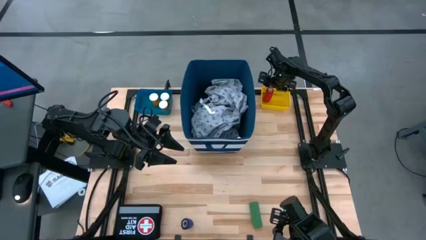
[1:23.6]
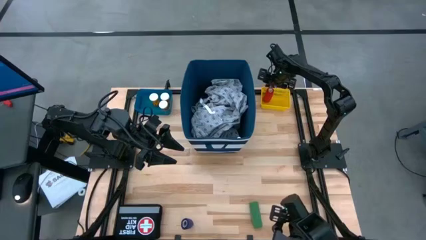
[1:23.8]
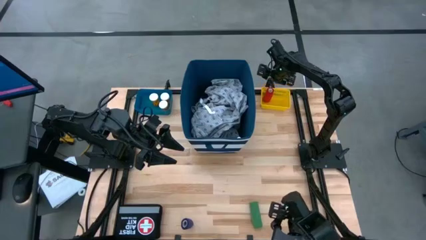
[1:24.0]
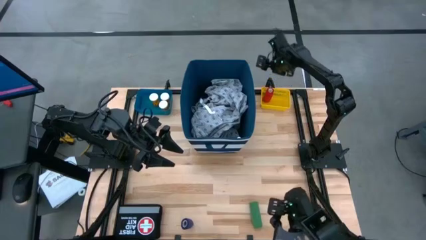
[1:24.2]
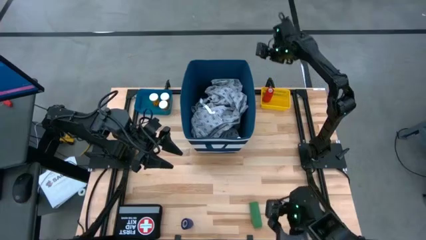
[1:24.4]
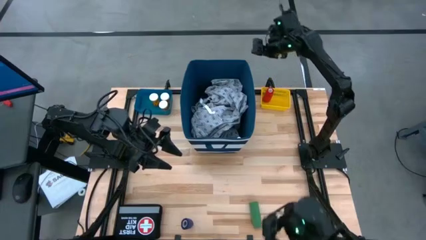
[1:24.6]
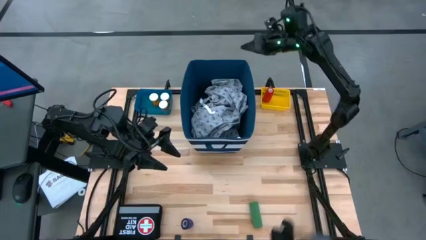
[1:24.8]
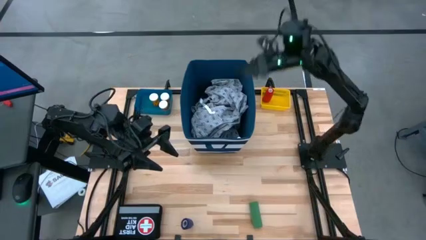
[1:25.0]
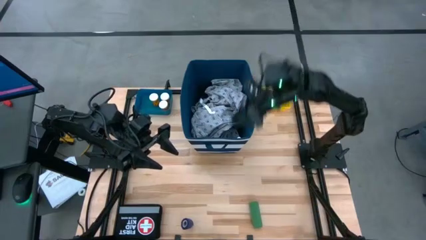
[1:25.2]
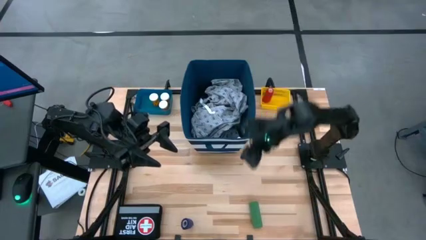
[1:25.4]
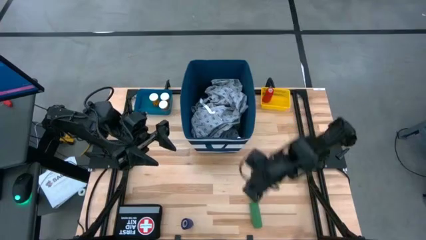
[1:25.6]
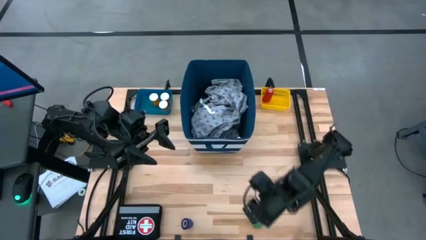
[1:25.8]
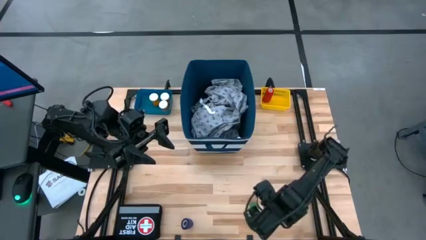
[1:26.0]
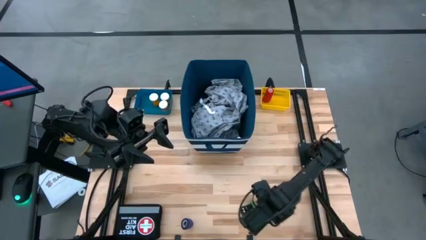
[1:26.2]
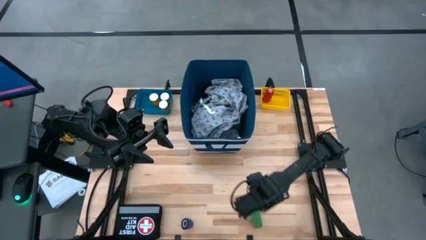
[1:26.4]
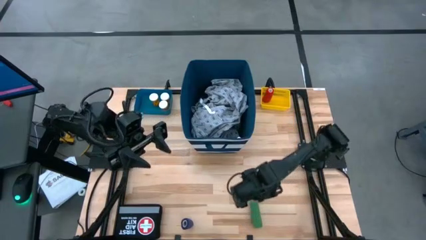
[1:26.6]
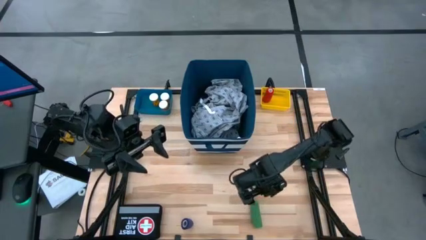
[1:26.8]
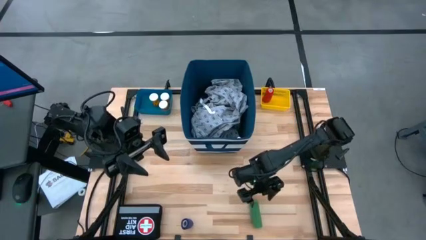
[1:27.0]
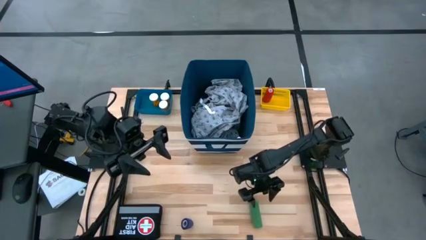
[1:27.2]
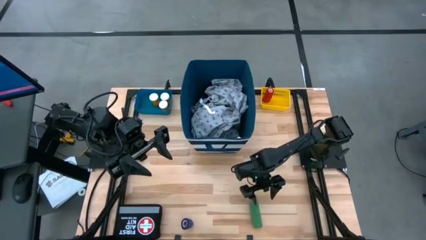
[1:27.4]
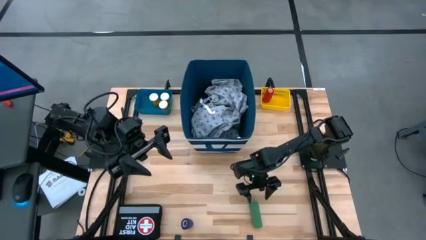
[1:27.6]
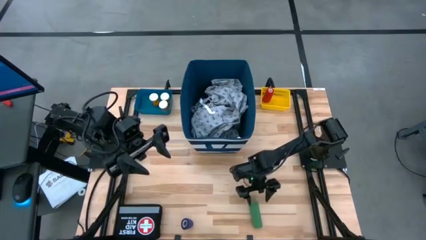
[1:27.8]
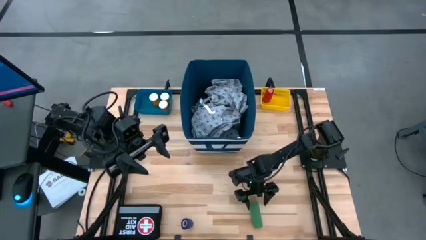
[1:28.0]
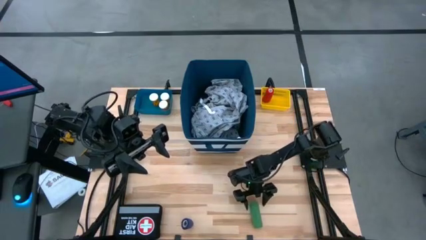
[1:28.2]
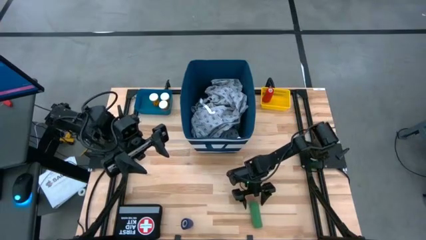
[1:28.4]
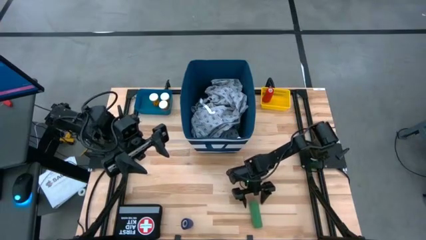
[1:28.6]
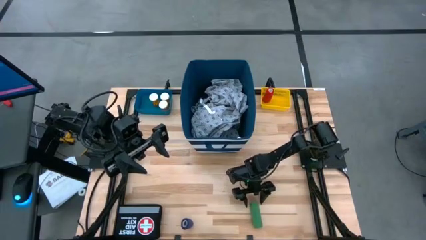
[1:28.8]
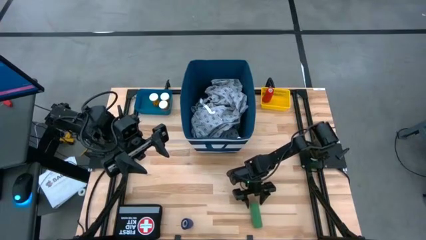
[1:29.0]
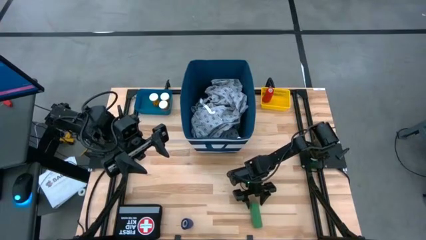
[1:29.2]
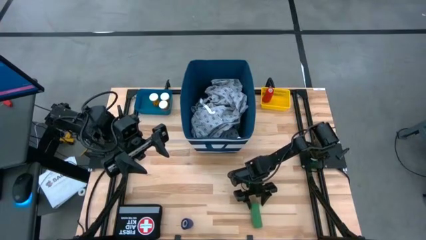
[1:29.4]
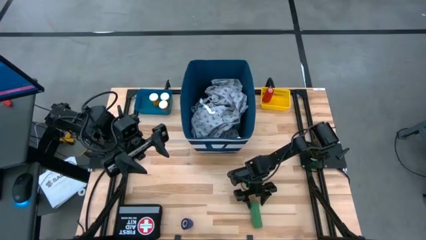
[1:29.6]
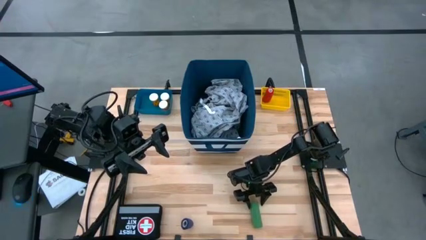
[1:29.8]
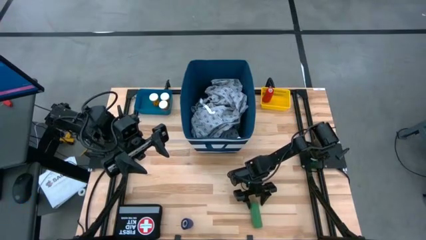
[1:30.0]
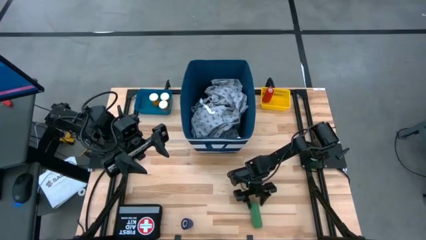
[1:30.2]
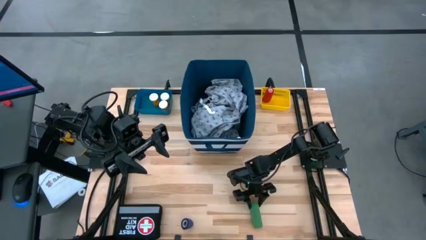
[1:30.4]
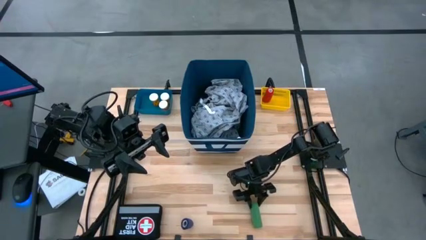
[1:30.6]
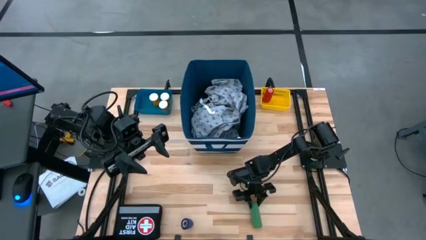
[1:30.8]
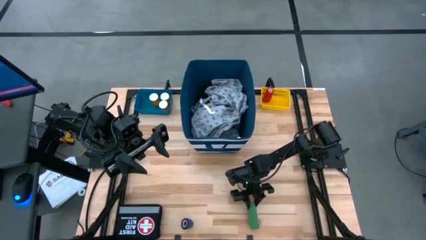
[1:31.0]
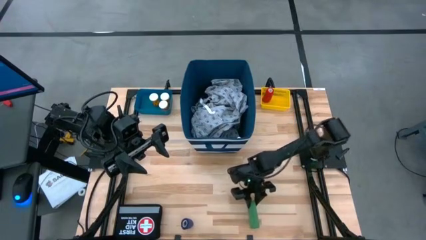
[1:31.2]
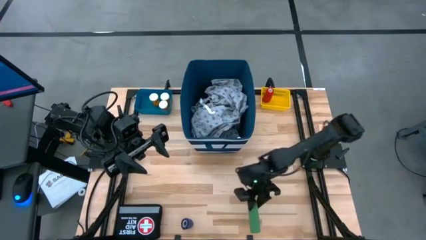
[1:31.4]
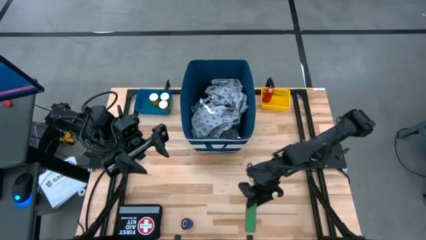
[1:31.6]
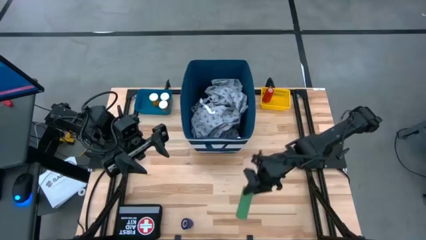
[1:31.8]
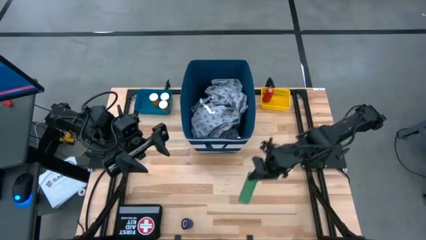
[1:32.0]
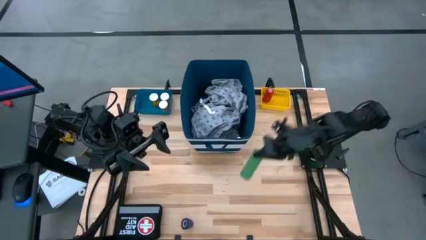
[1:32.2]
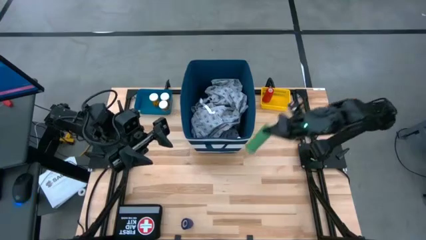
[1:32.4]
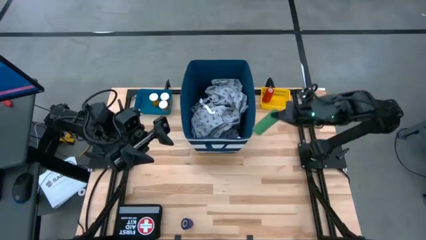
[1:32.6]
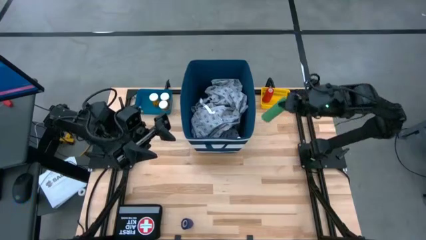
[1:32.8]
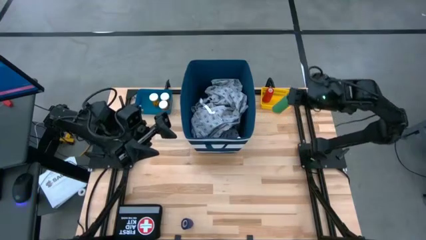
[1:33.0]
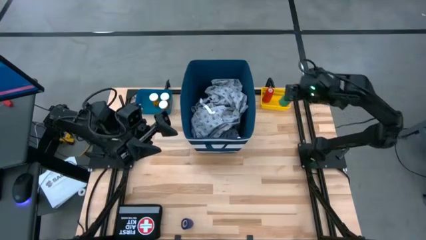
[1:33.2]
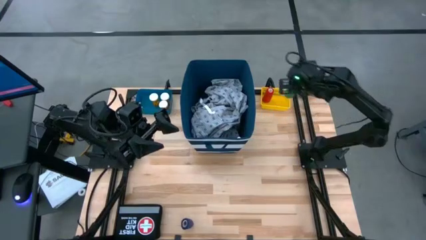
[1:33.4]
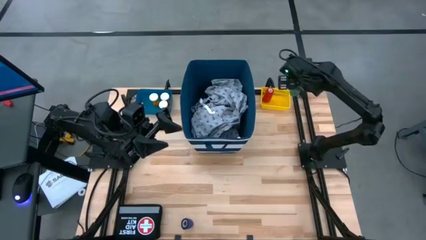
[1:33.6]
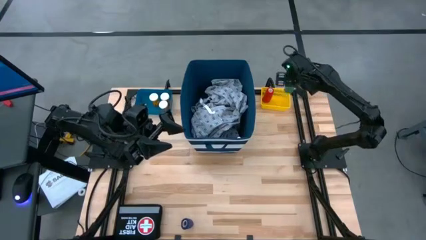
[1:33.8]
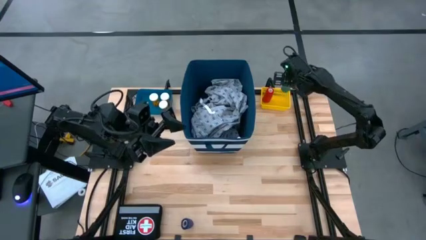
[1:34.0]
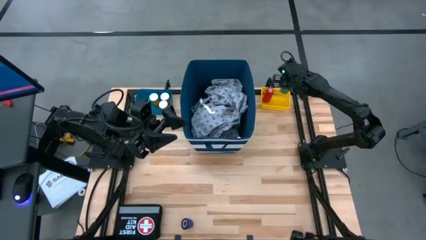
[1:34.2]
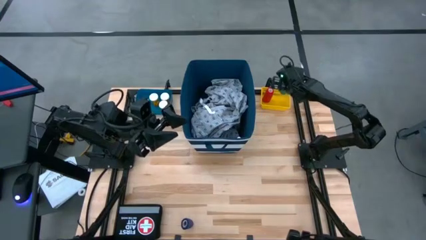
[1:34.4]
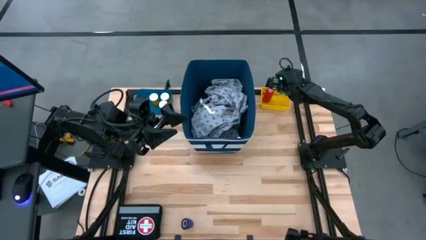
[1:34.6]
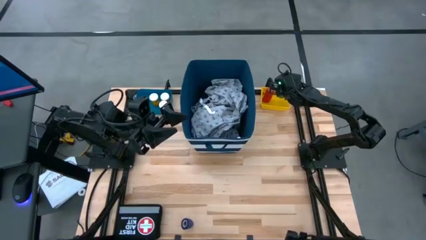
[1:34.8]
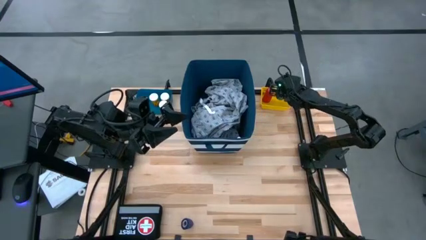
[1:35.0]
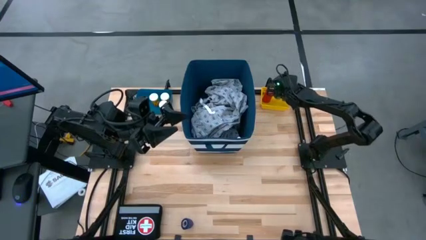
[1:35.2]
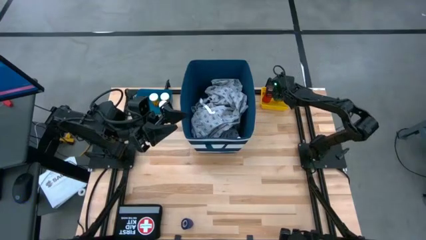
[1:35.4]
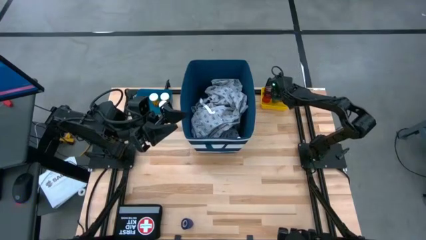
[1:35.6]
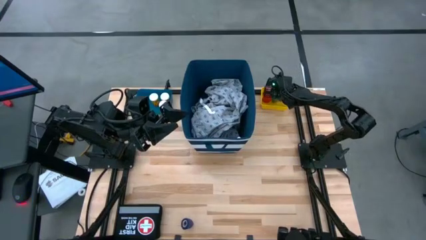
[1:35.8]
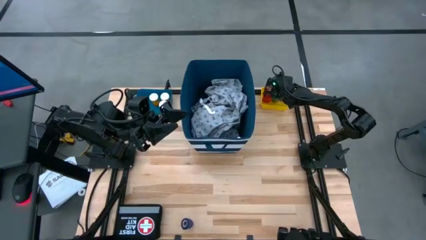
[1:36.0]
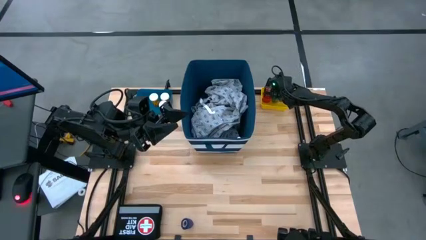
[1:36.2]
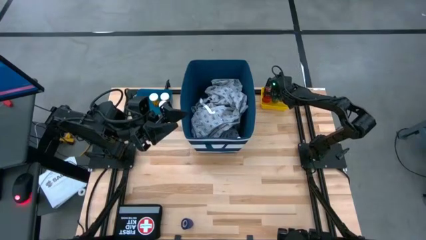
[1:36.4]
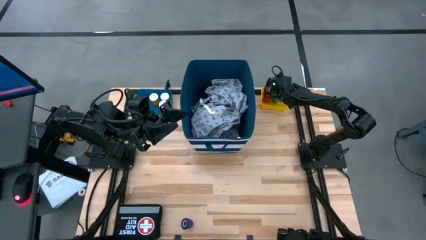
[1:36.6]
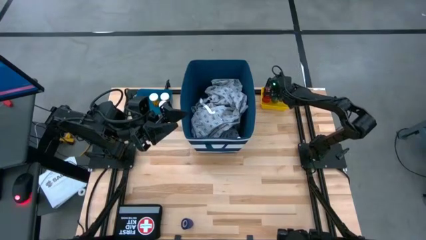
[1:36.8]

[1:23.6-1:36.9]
Task: Pick & place medical supplies in basket/bin
Put the green bandage into the yellow bin
